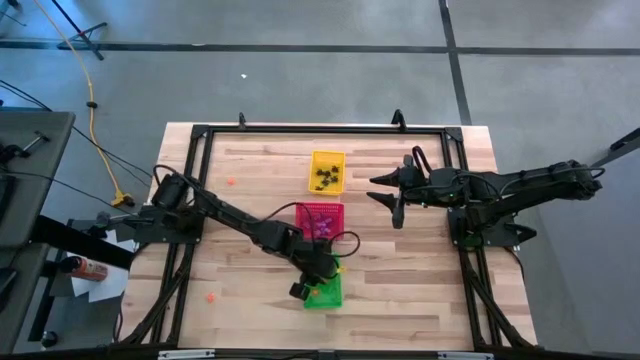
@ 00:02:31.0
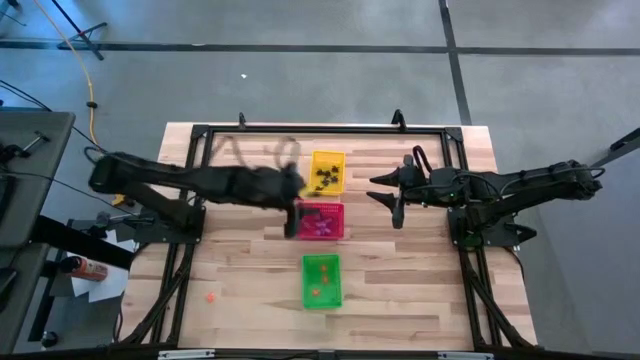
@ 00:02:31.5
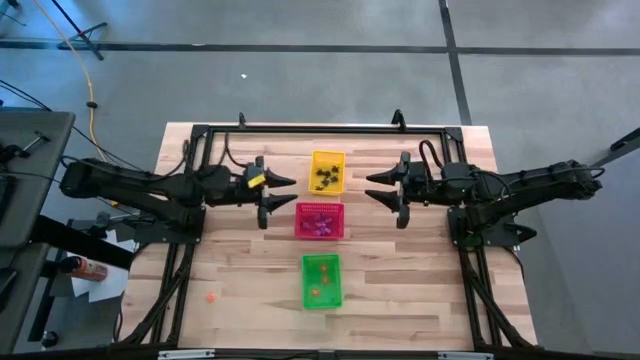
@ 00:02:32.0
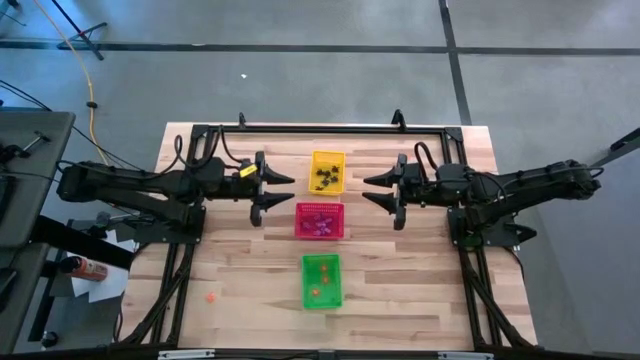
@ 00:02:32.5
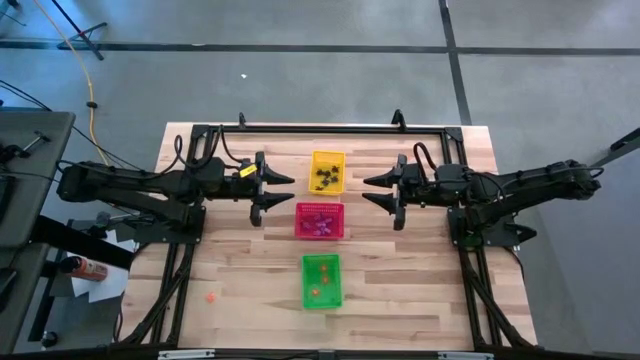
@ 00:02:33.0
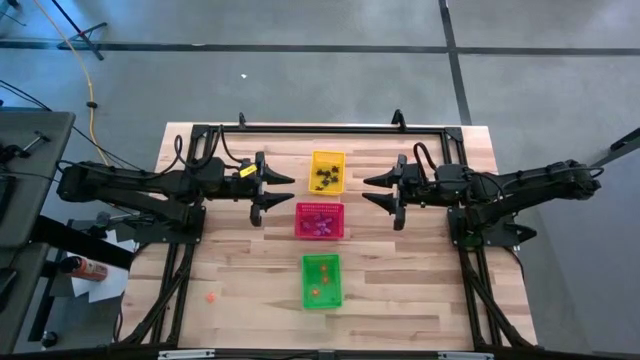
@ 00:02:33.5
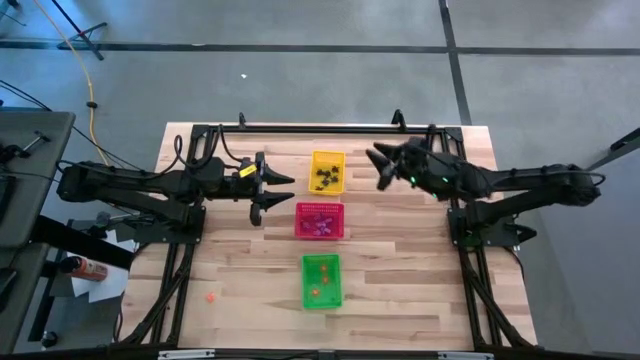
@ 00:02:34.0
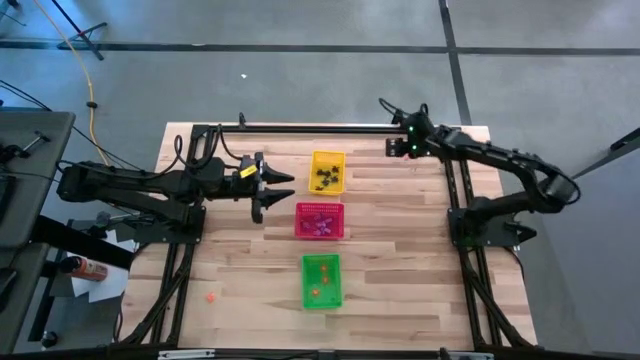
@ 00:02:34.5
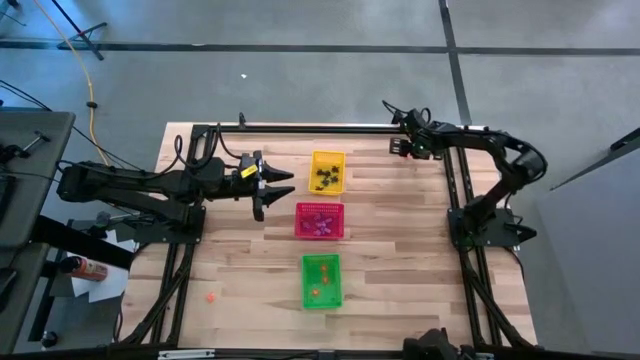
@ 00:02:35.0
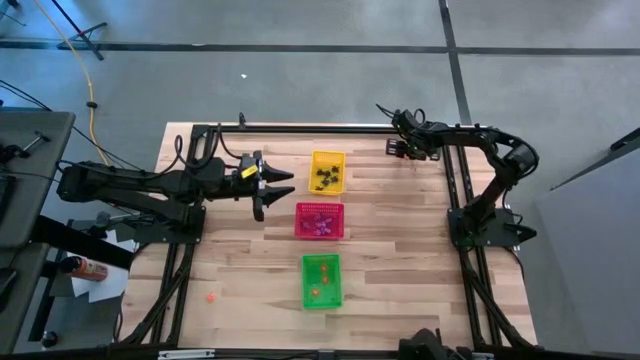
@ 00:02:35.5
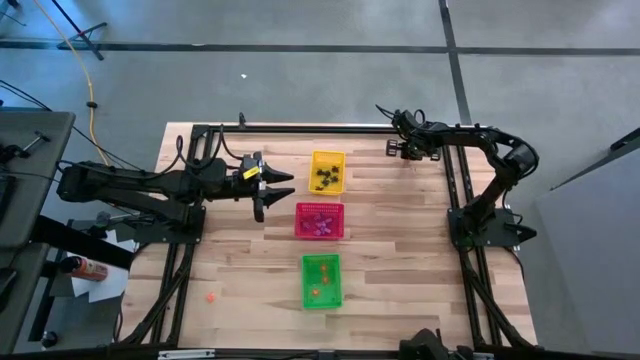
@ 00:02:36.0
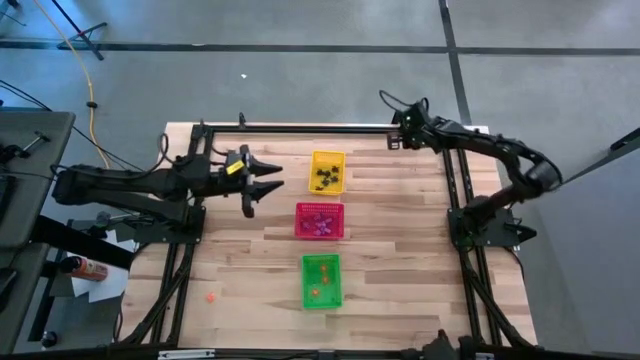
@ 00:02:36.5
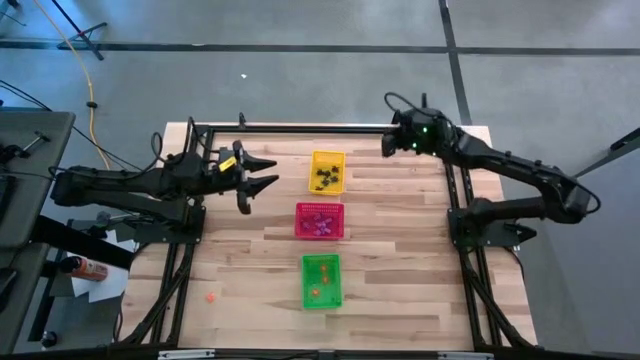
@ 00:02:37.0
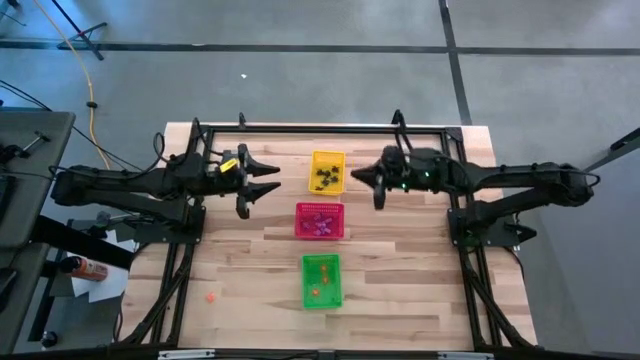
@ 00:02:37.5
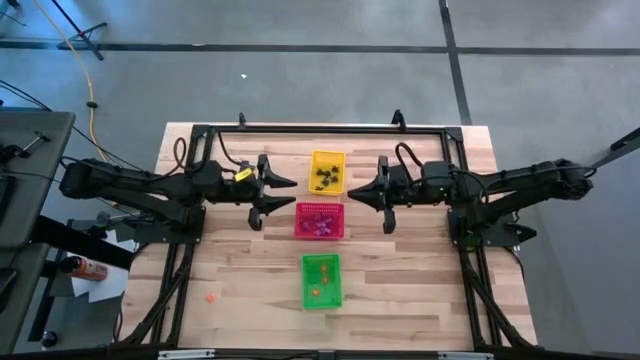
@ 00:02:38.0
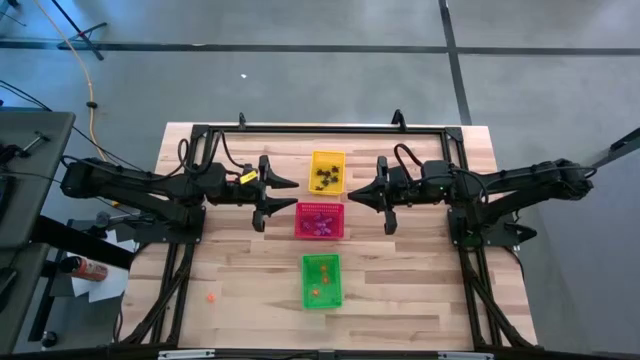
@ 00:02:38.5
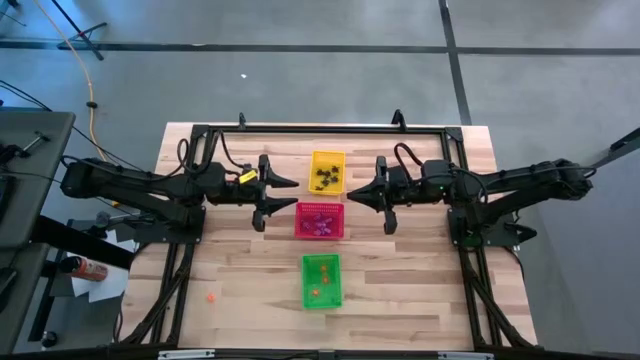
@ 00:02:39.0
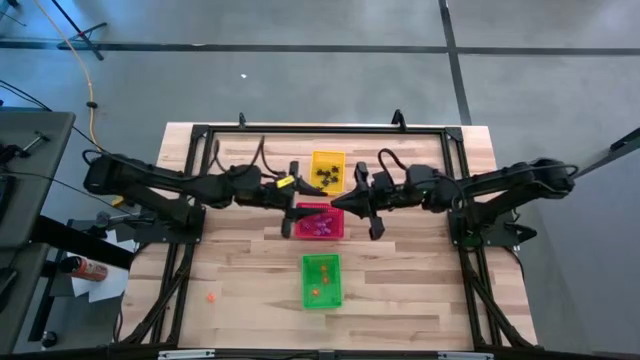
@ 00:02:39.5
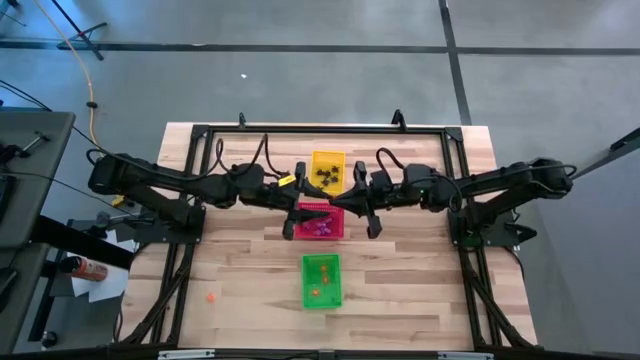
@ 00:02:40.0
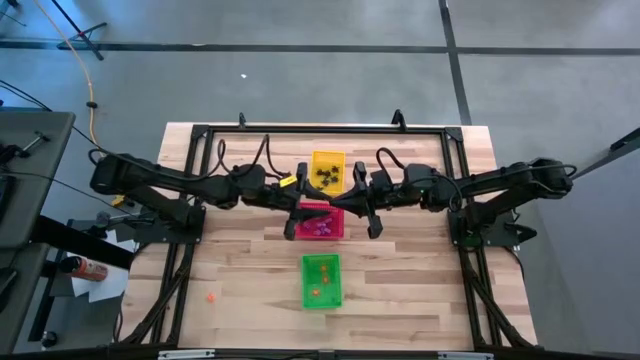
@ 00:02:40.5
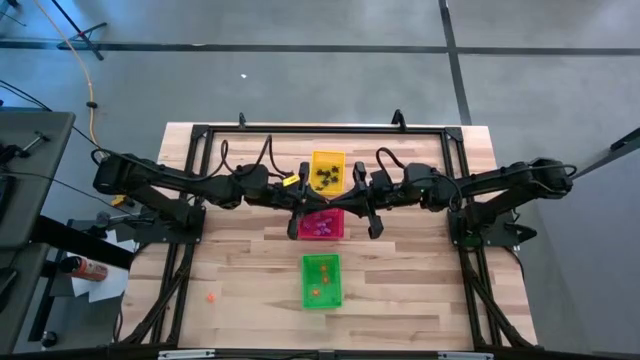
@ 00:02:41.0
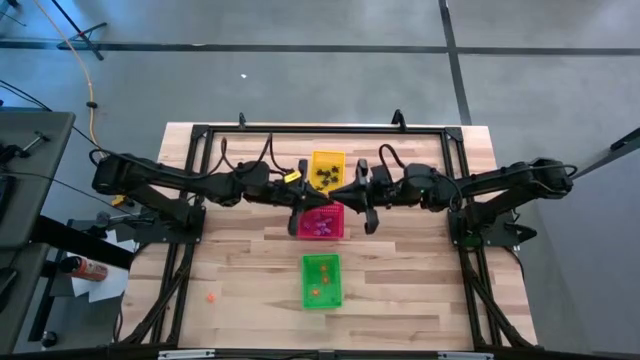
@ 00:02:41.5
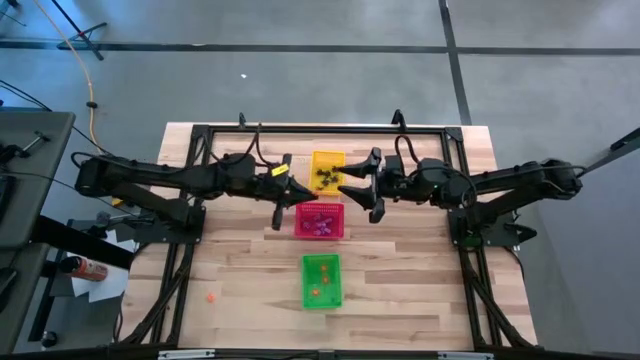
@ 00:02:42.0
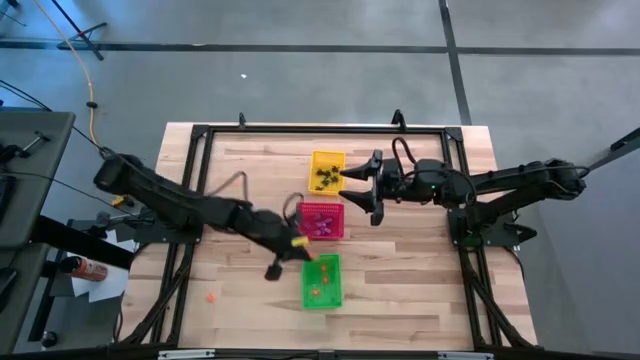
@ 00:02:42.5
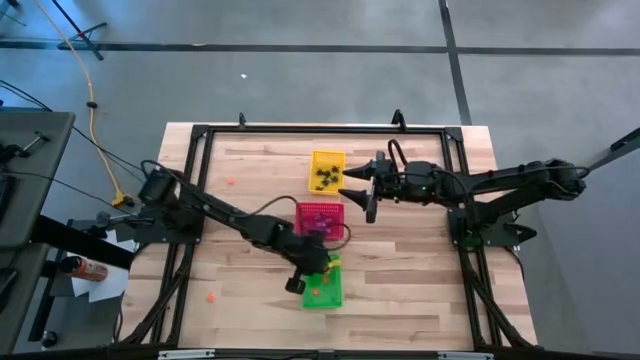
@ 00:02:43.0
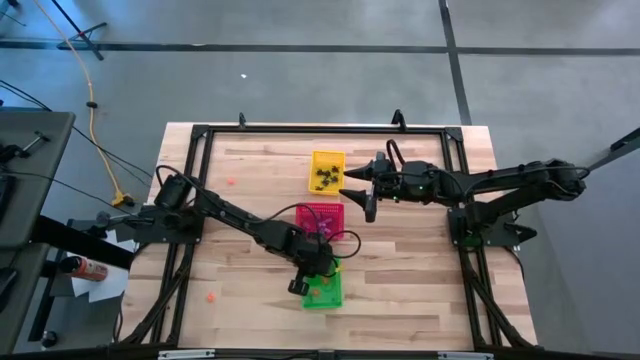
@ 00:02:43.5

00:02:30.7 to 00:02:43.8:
Task: Sort Halloween decoration
Put the orange spider toy into the green bin

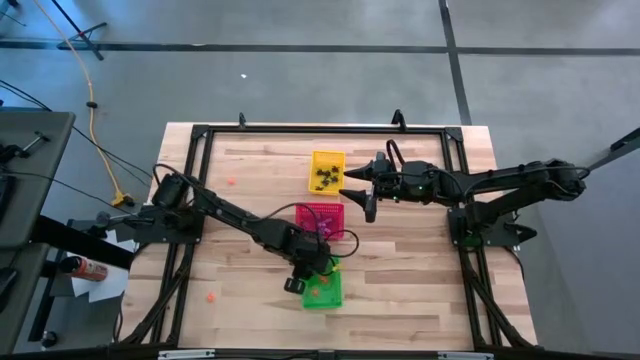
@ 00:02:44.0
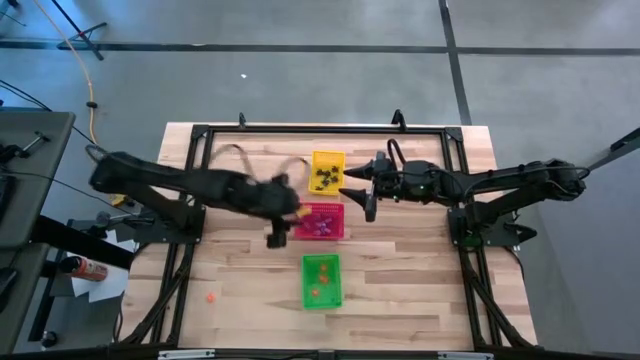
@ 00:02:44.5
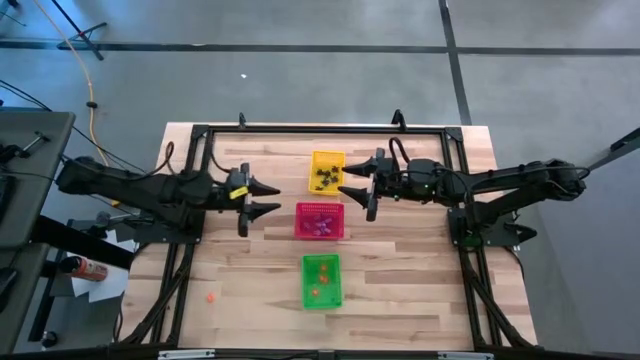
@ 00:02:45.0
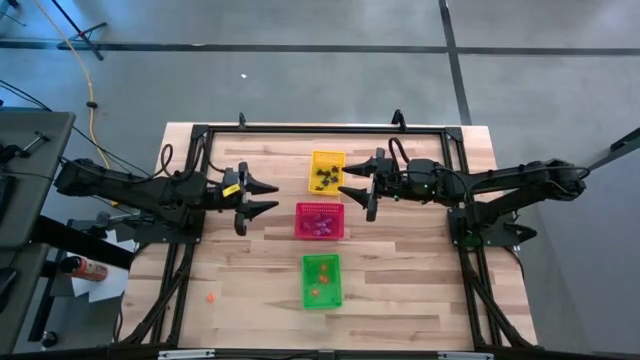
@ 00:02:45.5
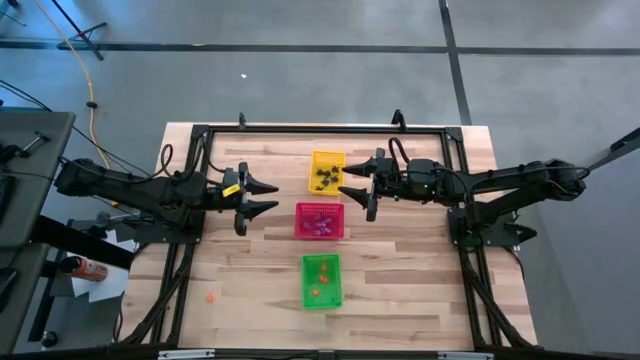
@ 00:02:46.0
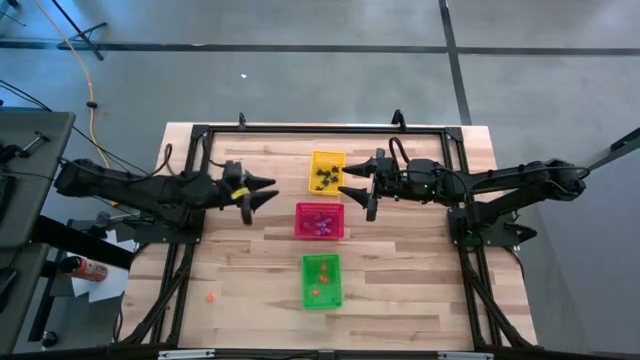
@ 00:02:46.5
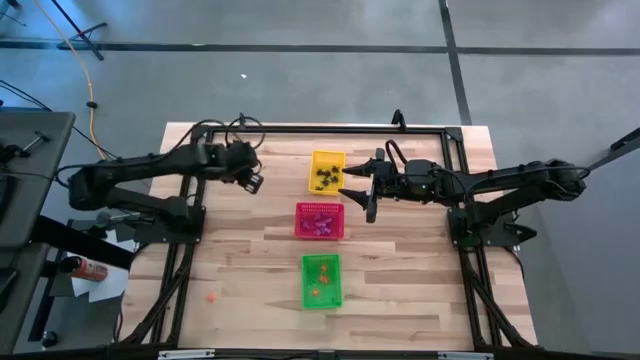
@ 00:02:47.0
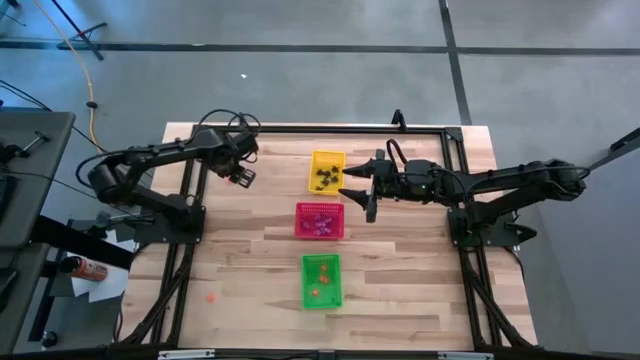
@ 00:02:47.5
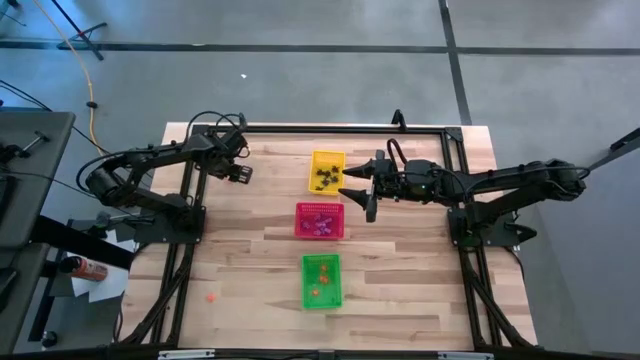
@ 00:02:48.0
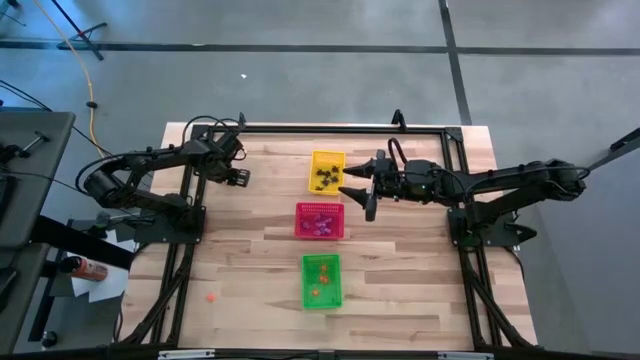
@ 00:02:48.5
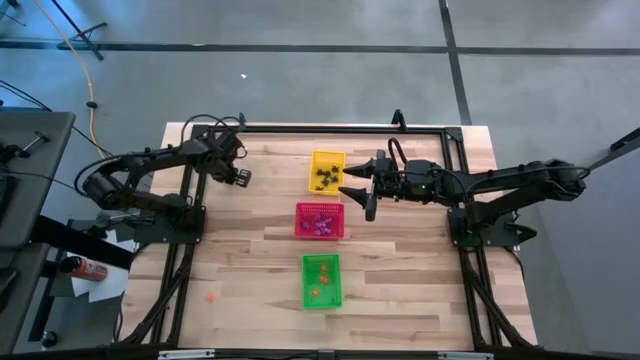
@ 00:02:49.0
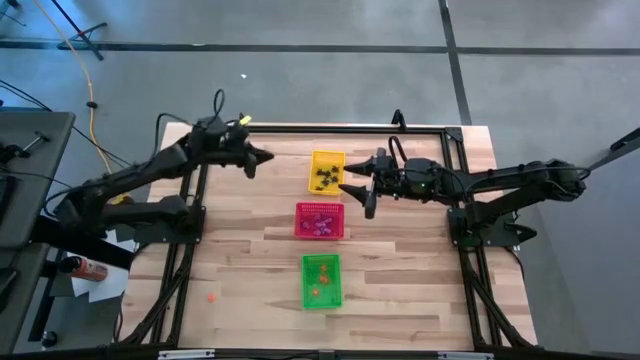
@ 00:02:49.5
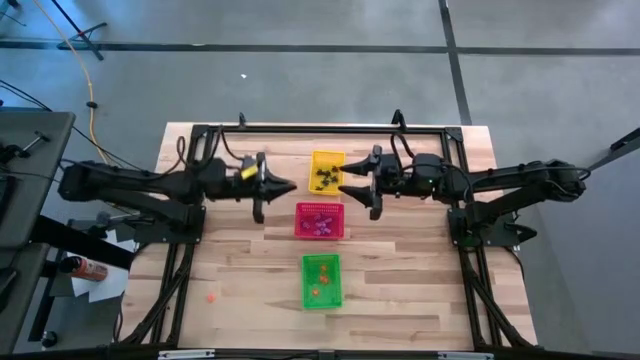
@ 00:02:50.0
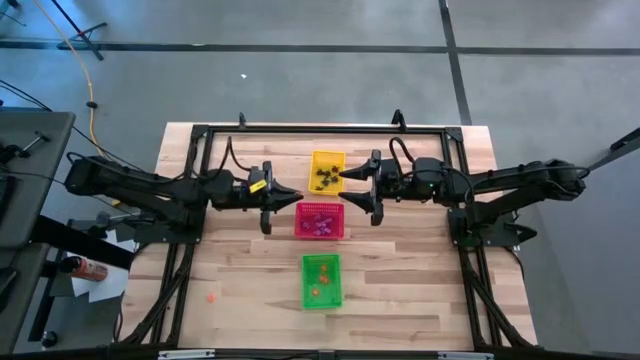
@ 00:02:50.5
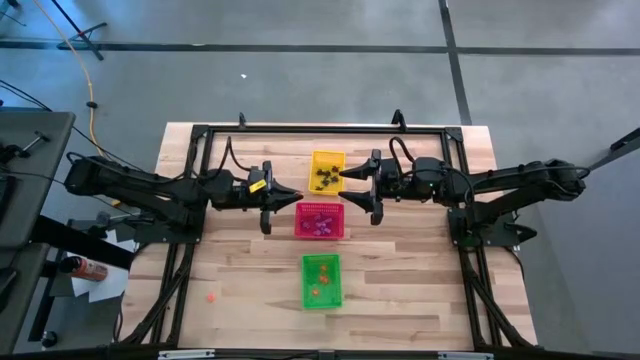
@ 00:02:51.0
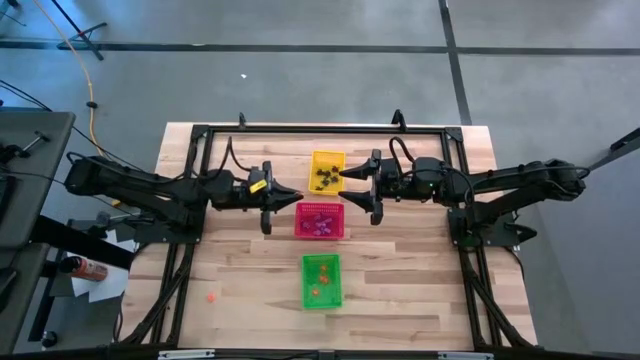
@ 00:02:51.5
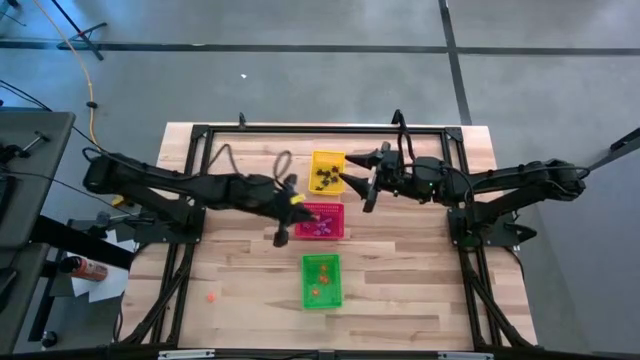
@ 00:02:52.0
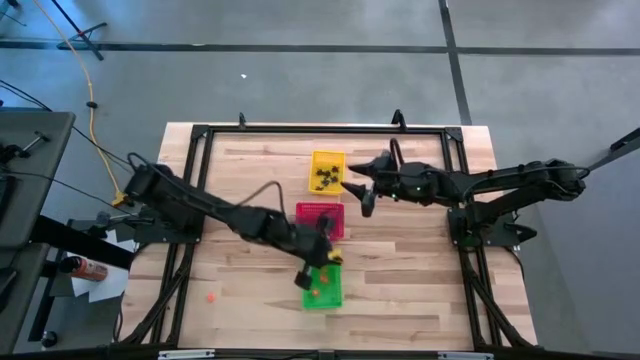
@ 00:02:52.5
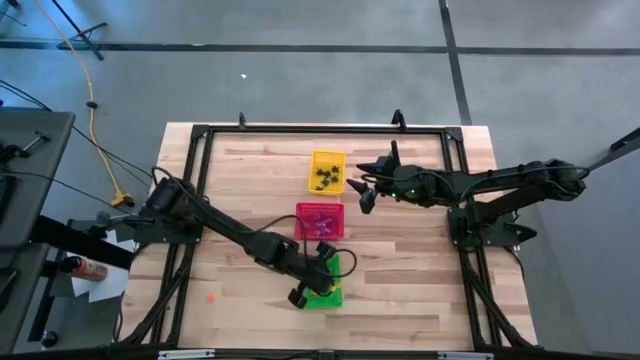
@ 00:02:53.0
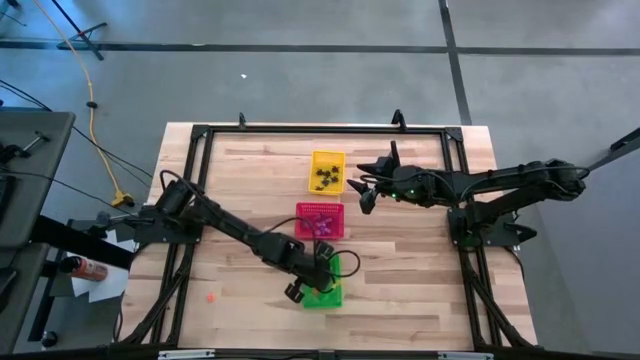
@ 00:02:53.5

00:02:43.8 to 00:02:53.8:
Put the orange spider toy into the green bin
